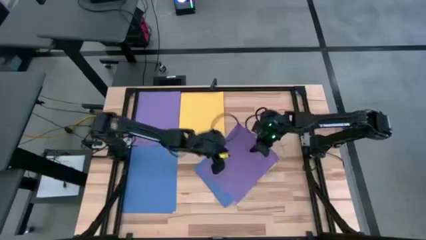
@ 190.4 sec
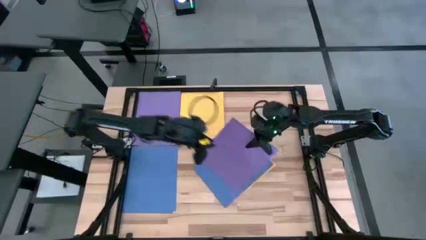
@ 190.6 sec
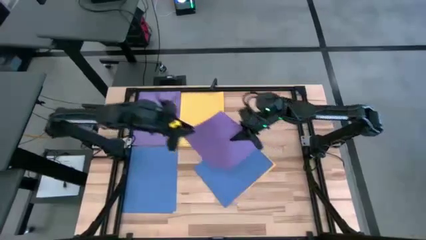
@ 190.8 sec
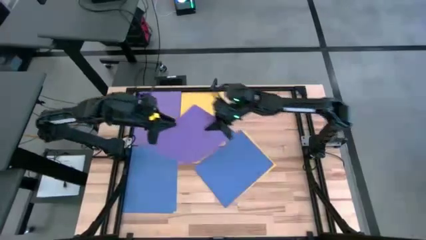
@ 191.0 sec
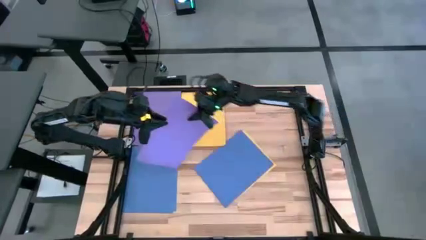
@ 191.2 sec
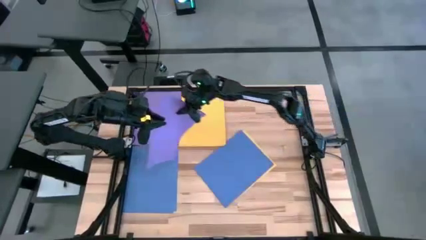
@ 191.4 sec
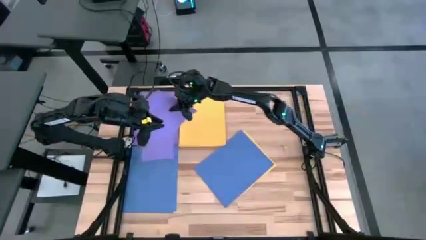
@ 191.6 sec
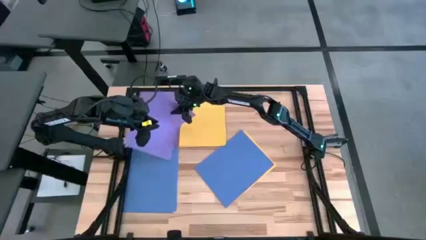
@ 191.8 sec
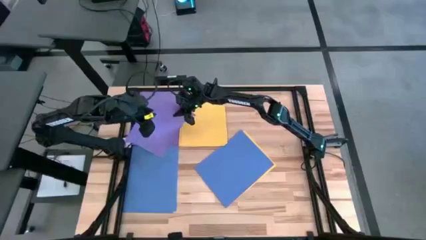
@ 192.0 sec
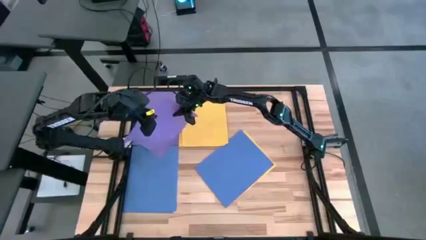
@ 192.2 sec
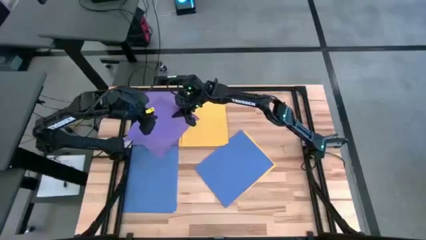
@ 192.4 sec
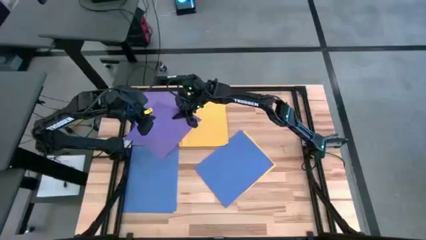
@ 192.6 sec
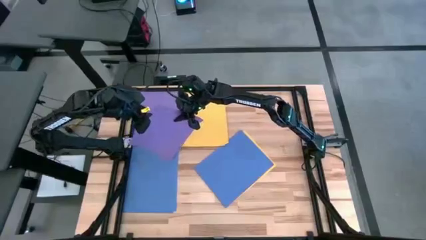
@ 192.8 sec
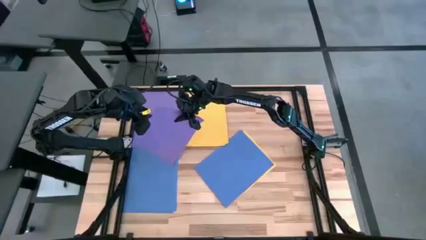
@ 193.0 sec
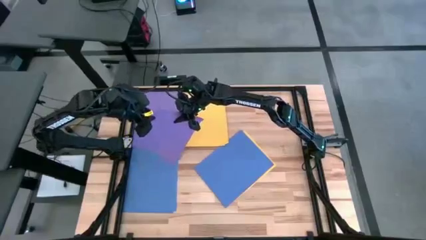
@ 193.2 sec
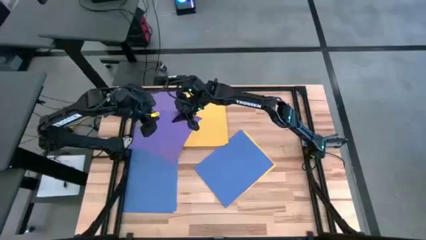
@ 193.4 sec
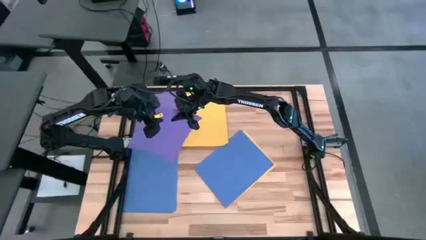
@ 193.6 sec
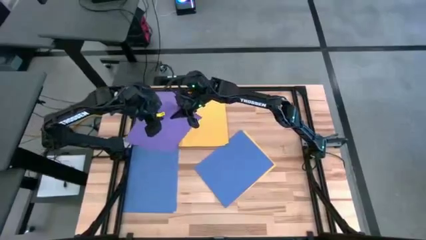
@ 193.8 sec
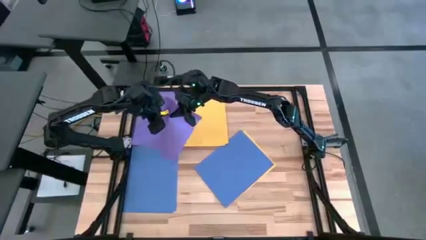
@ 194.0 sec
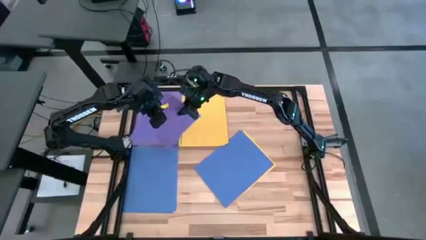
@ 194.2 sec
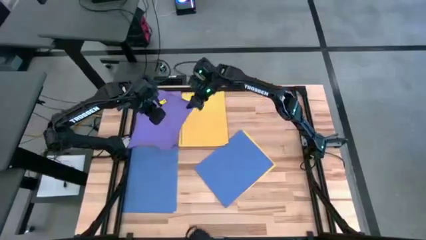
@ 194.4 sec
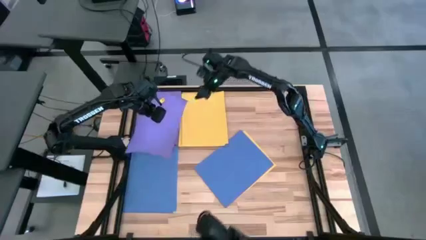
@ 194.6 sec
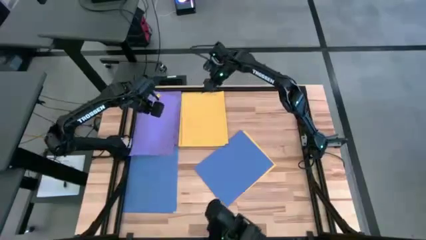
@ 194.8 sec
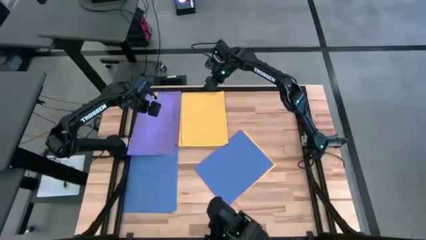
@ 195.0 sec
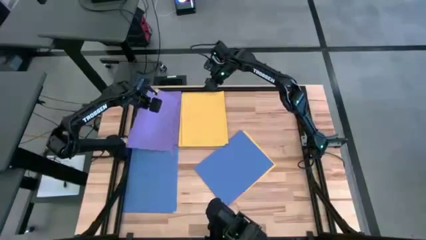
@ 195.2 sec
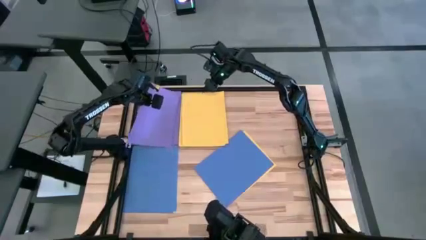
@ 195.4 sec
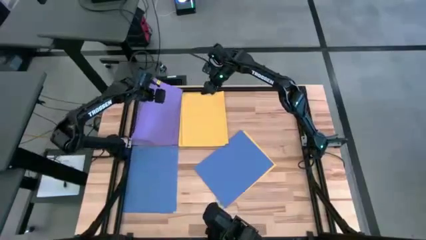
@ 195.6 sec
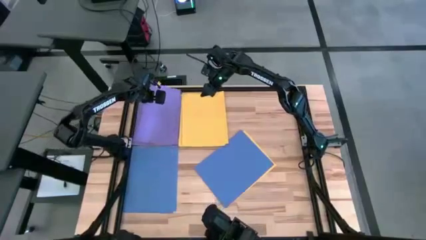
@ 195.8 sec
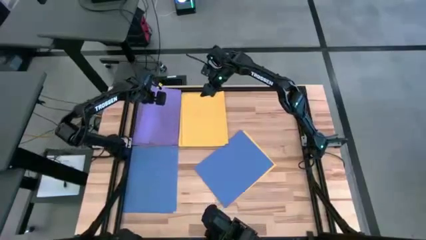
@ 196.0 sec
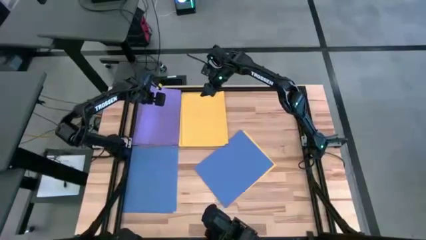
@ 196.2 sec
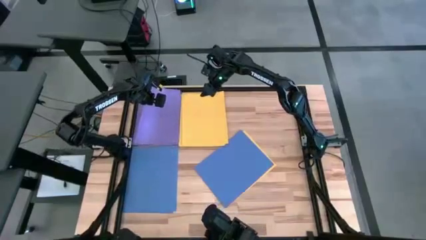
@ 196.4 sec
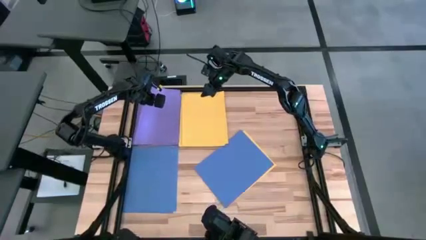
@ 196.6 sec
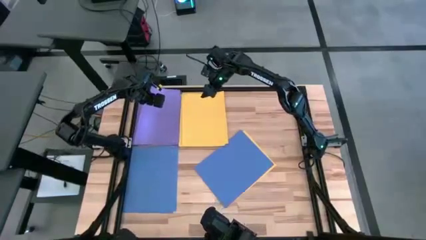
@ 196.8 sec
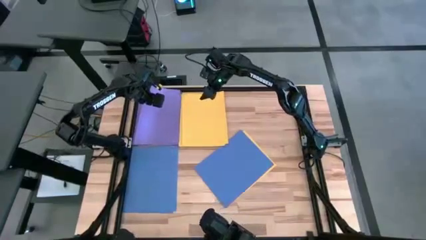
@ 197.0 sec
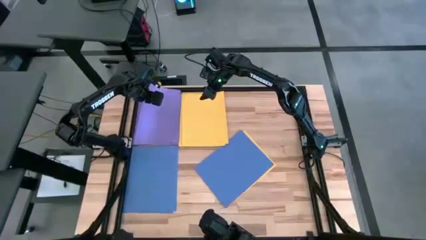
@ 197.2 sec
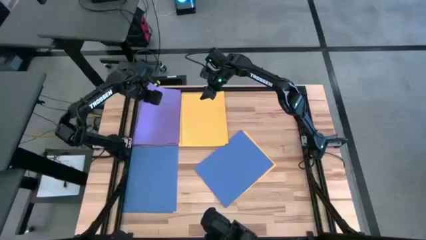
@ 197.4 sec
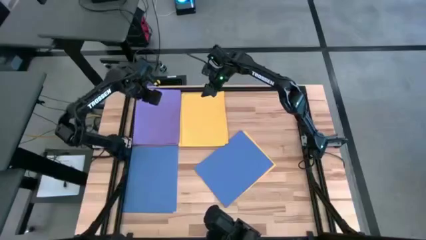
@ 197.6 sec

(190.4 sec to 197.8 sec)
Task: Organize paper
Stack the purple paper on top of the purple paper

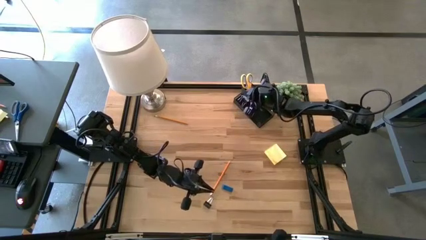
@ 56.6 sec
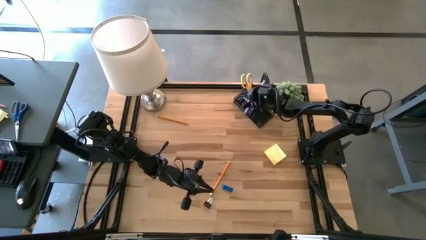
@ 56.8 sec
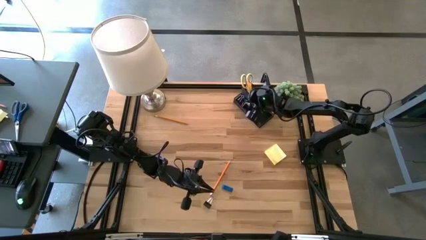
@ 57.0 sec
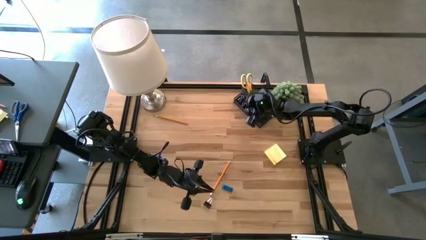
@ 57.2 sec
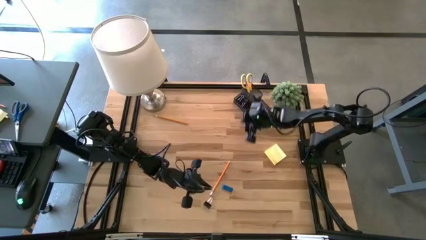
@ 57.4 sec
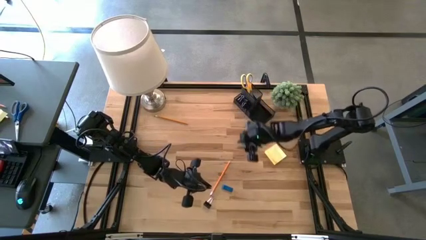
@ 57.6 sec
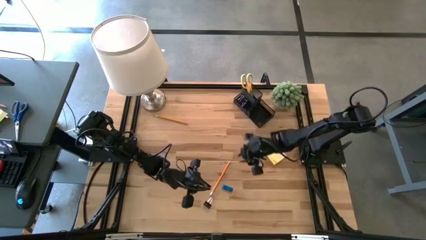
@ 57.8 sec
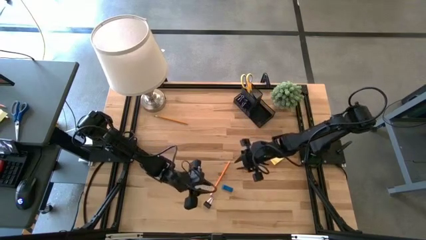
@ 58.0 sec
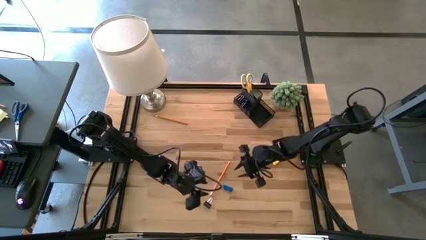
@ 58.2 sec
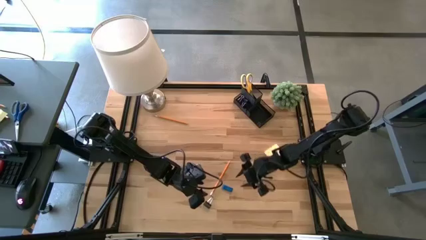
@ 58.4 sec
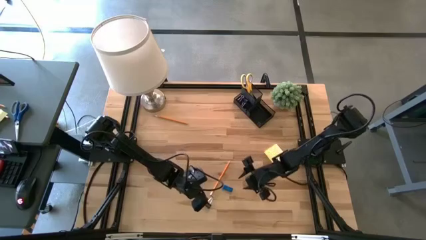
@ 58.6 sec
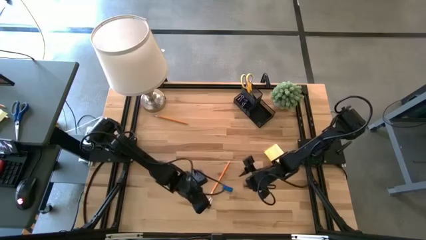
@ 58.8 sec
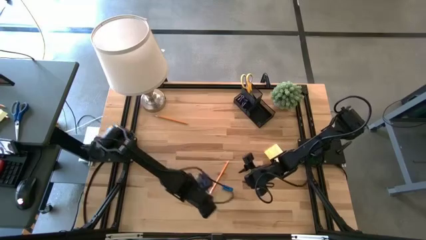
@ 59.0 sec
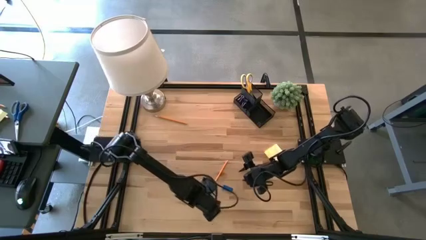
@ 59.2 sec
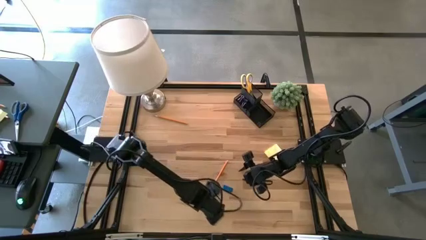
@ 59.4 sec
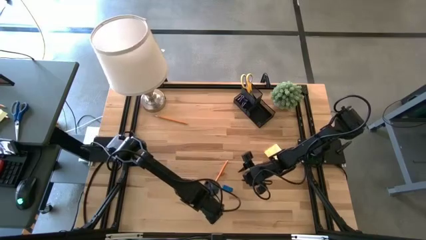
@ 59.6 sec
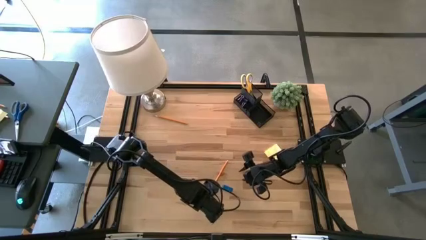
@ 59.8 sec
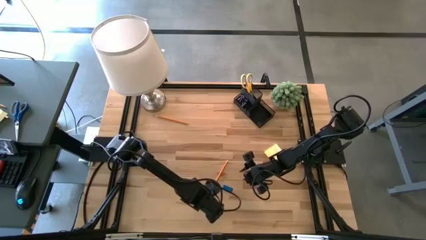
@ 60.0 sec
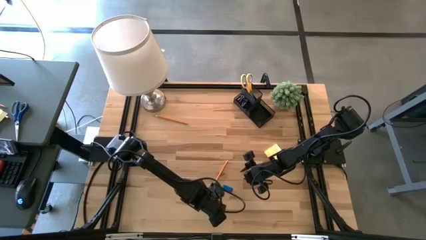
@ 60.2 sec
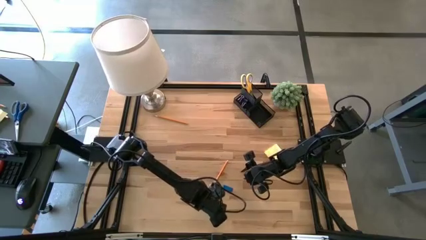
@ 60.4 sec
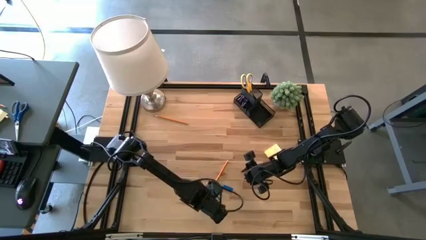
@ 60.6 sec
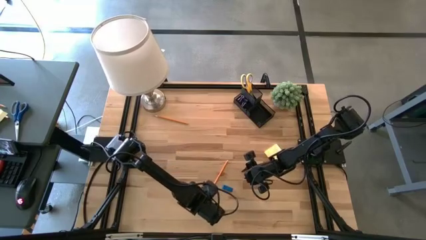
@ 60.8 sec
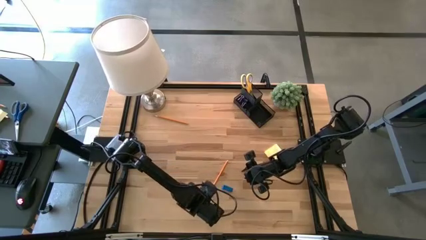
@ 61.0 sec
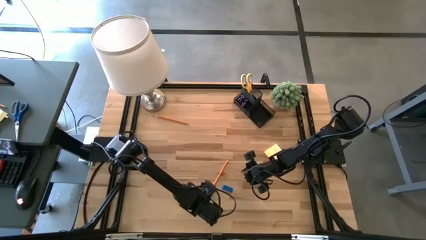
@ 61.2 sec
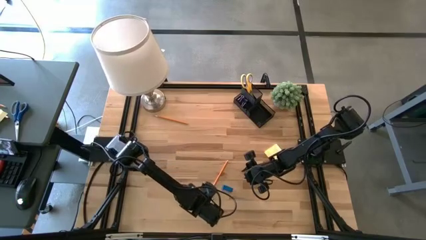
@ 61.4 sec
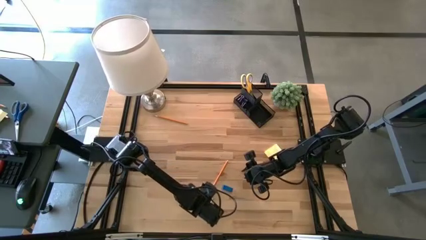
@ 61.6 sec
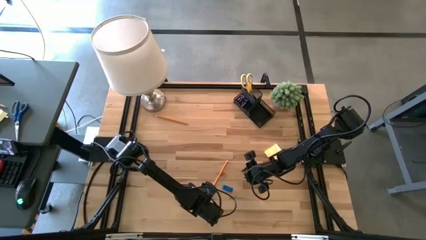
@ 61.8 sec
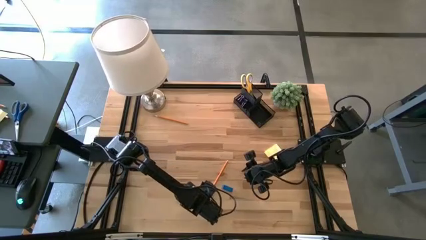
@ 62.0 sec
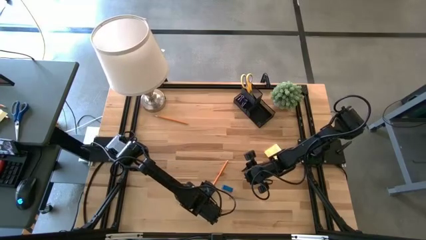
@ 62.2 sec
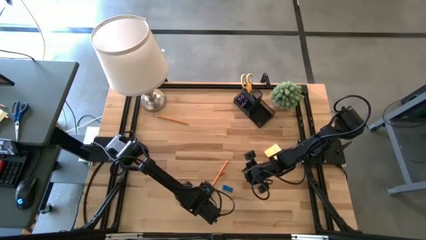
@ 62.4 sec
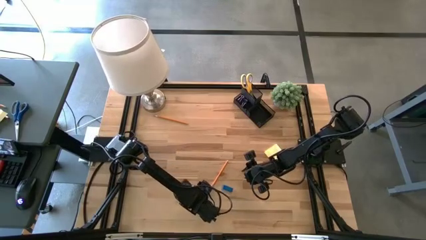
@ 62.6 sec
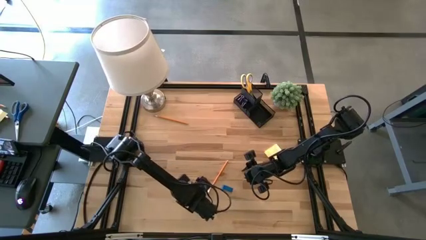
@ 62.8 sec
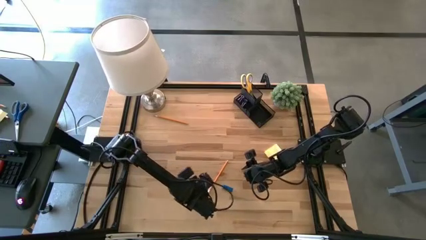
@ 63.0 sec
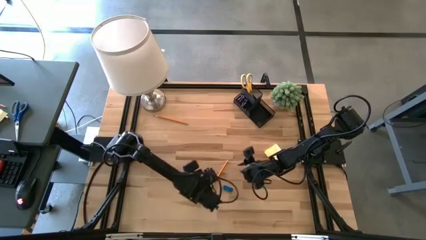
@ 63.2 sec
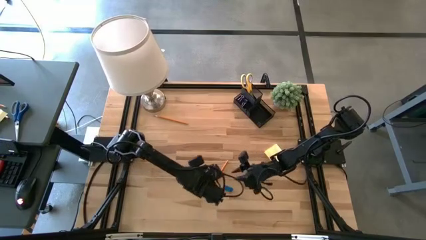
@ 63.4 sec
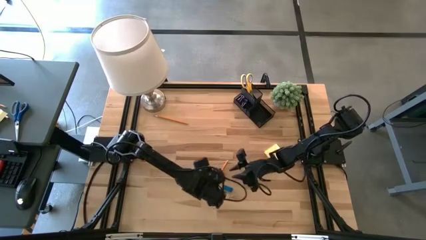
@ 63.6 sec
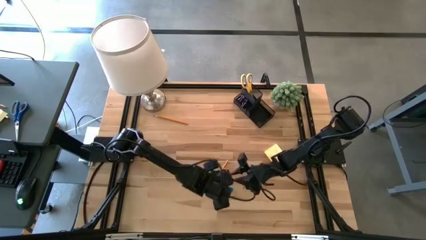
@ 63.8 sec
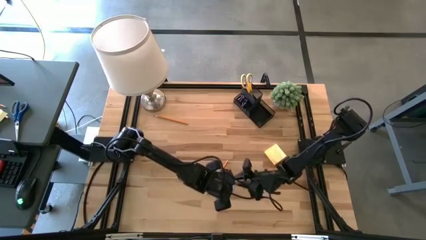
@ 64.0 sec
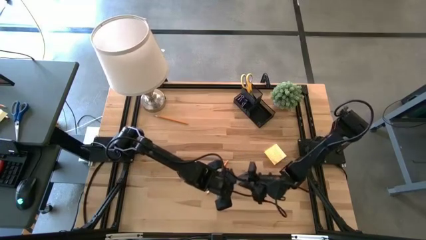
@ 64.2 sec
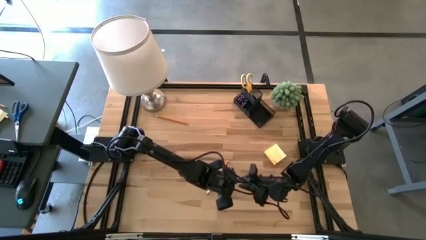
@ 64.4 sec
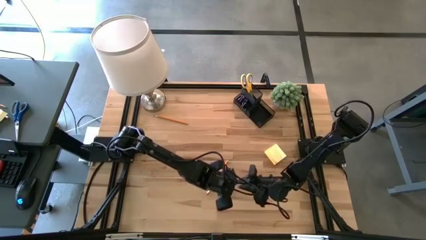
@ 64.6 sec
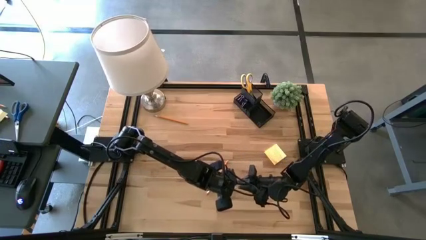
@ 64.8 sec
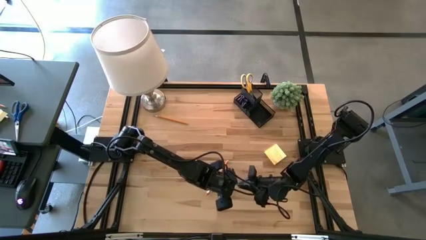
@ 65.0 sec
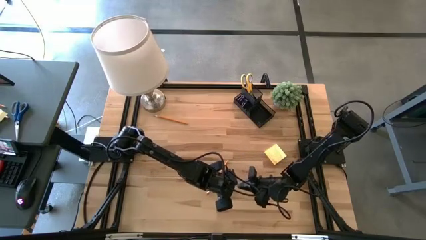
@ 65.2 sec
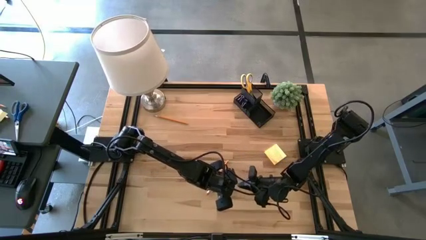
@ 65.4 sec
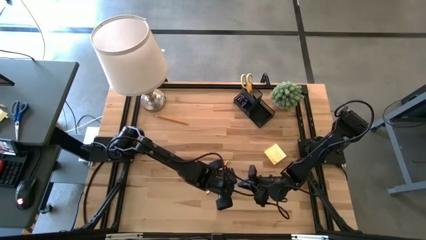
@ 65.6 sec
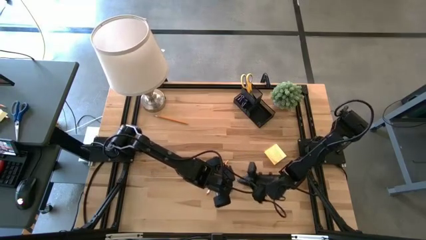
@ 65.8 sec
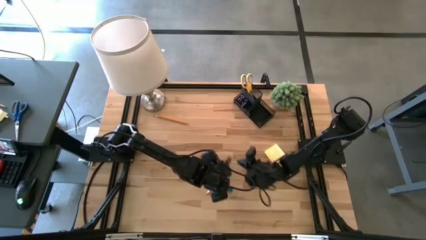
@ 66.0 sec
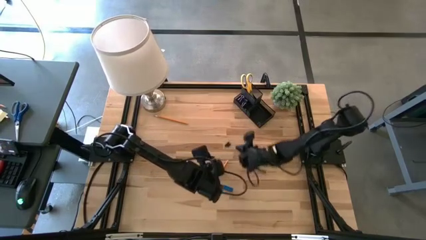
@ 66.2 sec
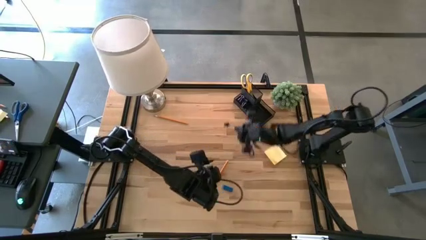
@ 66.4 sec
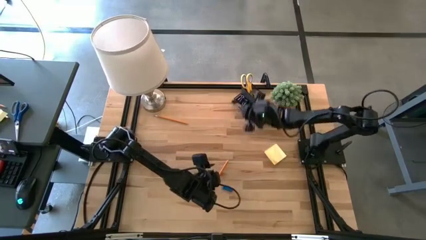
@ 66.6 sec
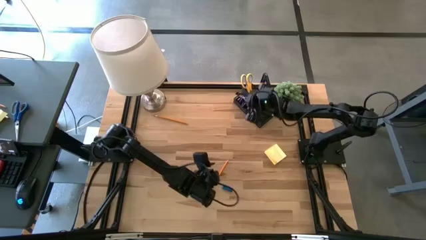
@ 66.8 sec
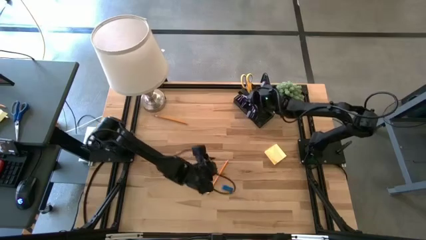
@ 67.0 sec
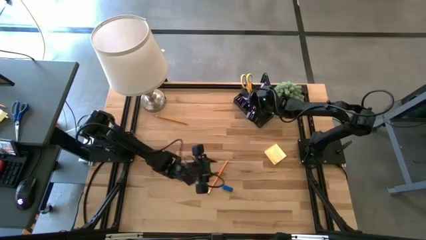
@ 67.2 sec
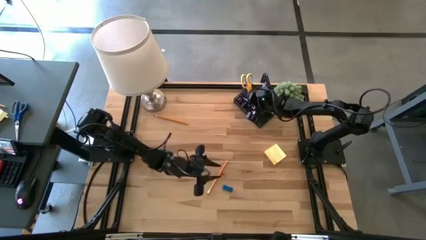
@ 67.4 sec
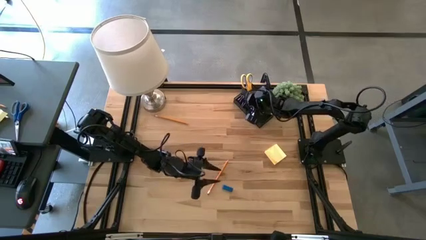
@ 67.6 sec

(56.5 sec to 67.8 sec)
Task: Pick and place office supplies into organizer
Put the black binder clip into the desk organizer
